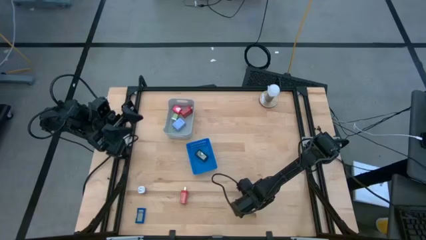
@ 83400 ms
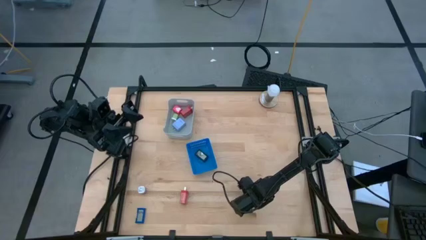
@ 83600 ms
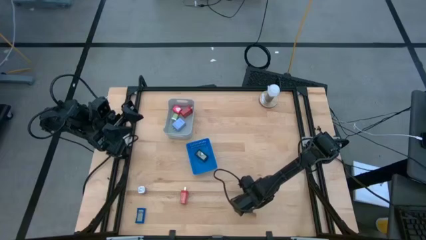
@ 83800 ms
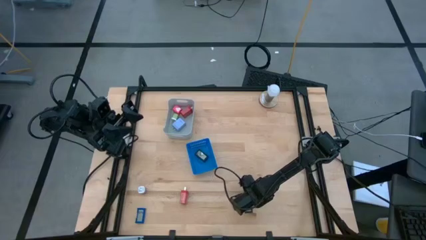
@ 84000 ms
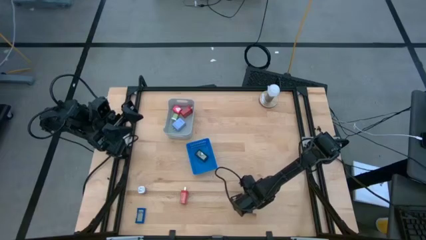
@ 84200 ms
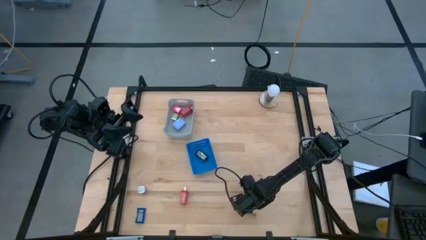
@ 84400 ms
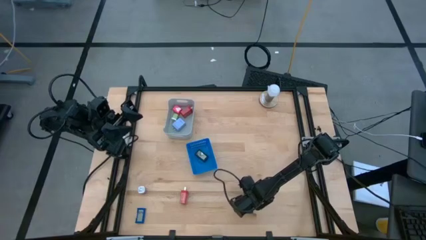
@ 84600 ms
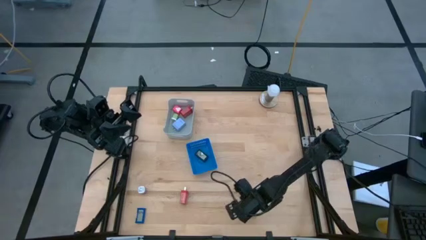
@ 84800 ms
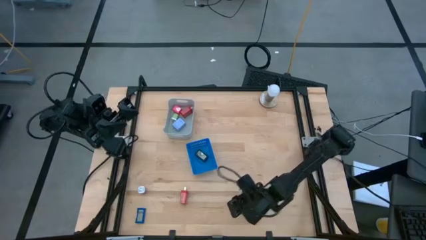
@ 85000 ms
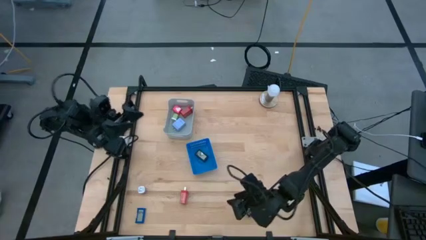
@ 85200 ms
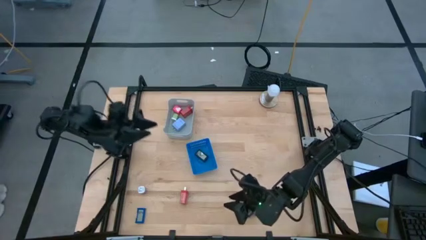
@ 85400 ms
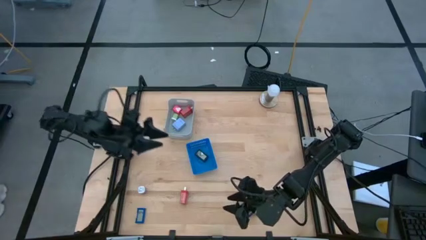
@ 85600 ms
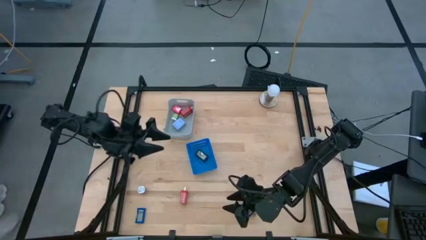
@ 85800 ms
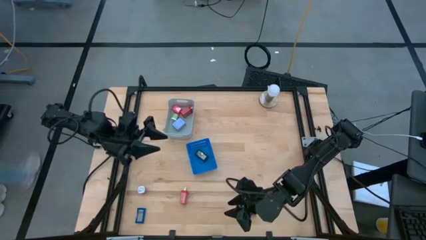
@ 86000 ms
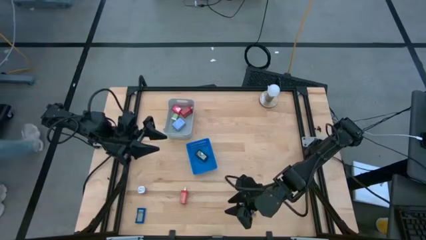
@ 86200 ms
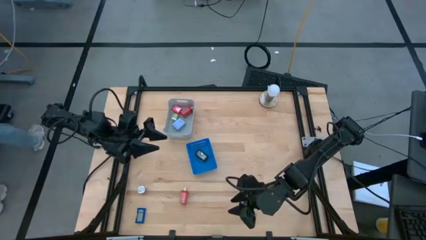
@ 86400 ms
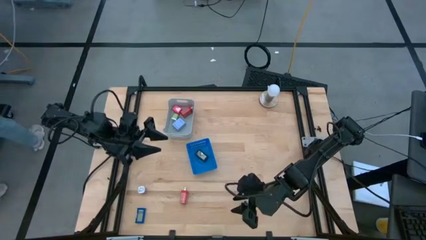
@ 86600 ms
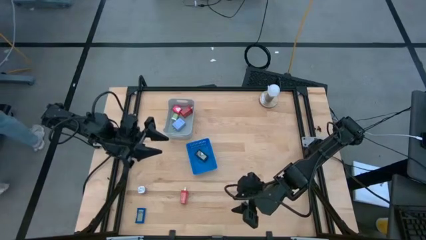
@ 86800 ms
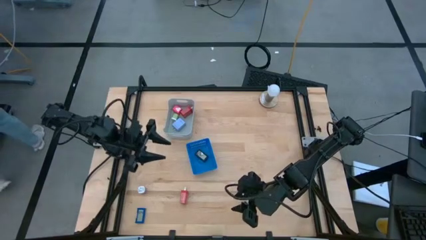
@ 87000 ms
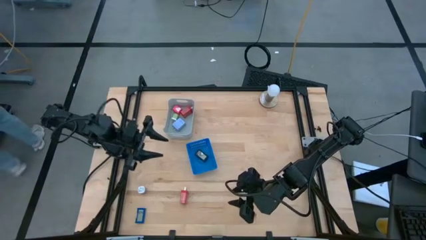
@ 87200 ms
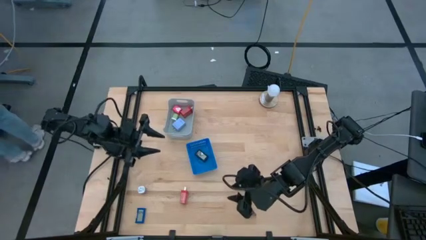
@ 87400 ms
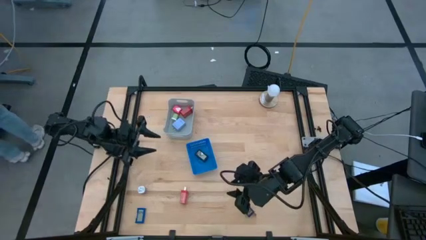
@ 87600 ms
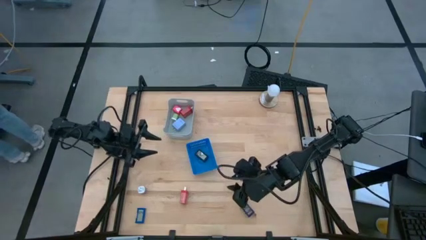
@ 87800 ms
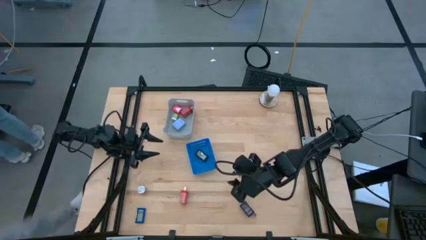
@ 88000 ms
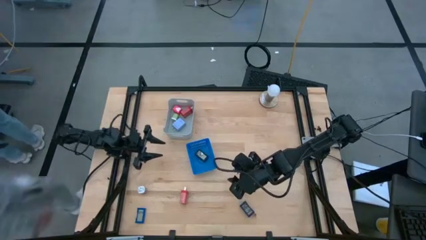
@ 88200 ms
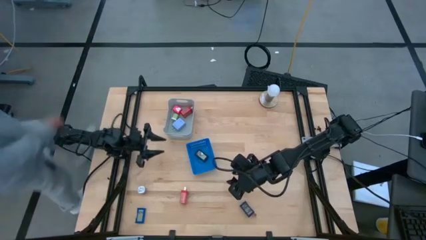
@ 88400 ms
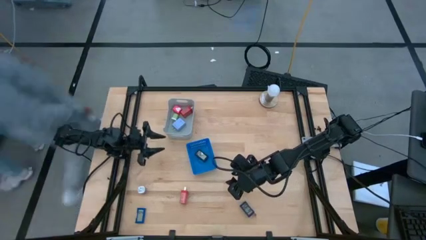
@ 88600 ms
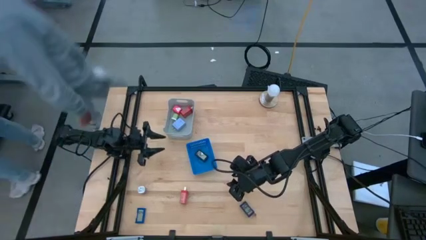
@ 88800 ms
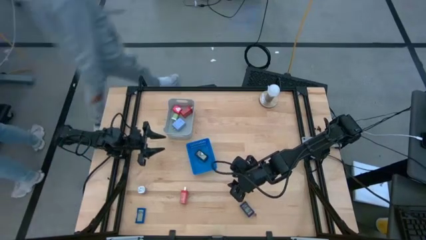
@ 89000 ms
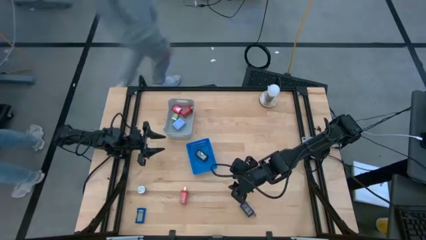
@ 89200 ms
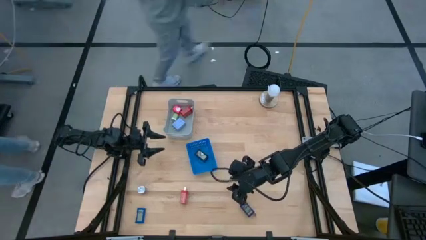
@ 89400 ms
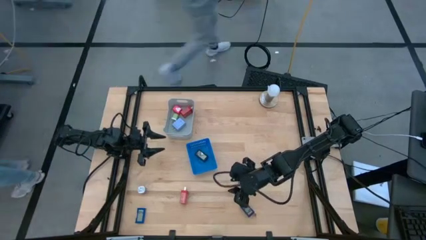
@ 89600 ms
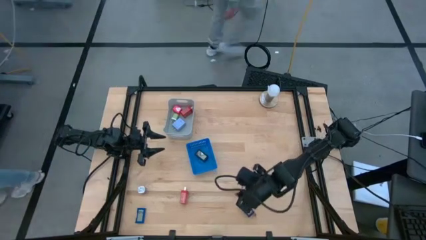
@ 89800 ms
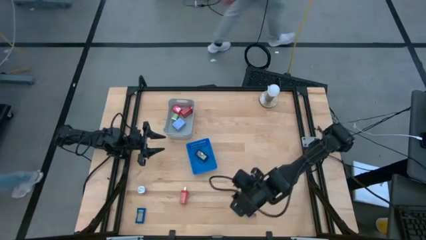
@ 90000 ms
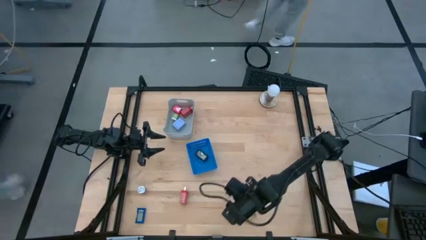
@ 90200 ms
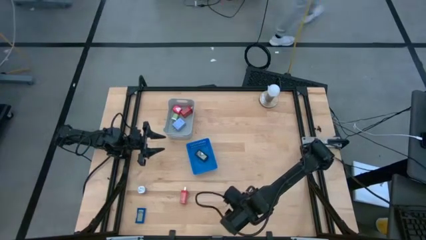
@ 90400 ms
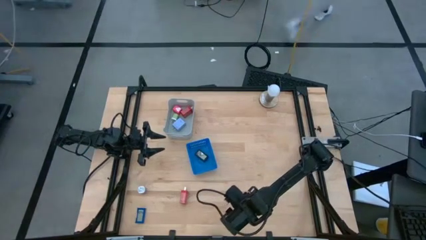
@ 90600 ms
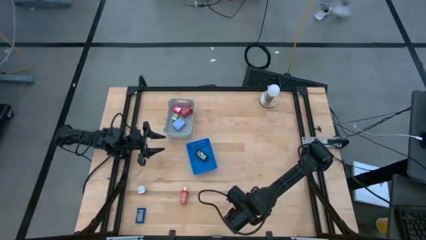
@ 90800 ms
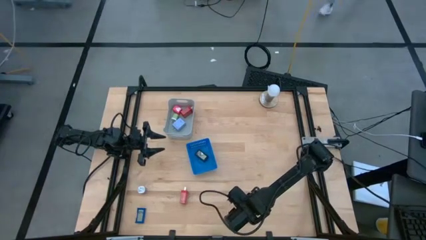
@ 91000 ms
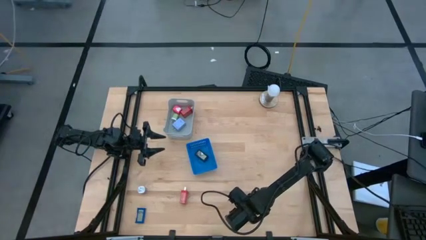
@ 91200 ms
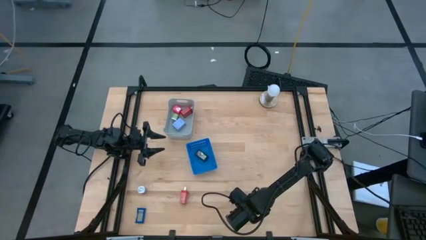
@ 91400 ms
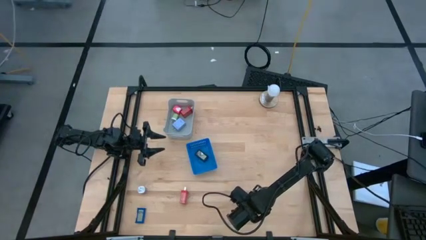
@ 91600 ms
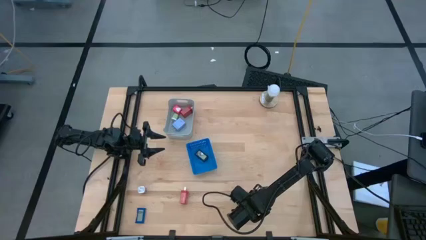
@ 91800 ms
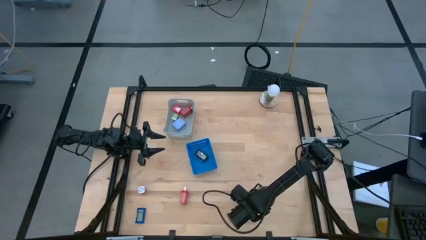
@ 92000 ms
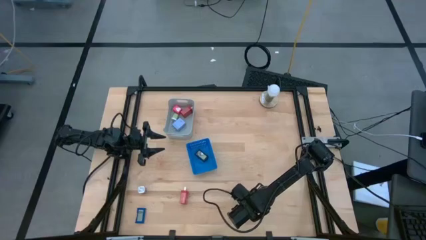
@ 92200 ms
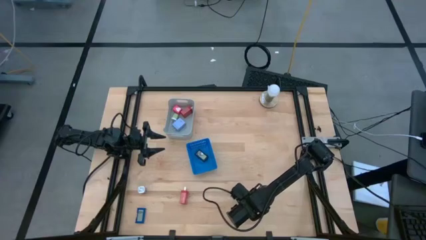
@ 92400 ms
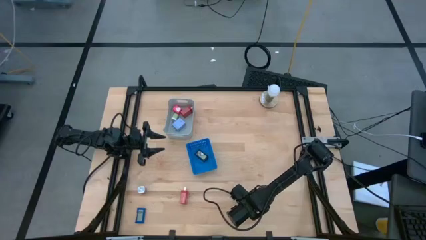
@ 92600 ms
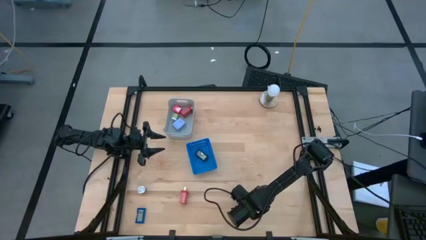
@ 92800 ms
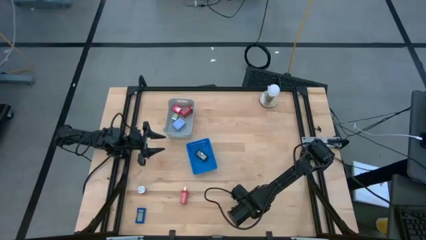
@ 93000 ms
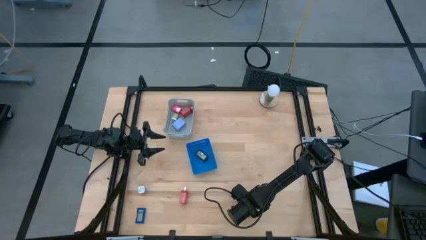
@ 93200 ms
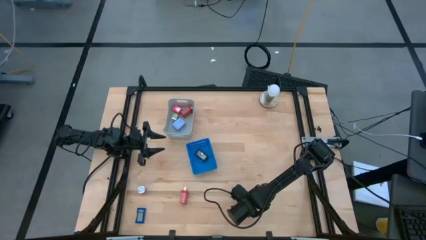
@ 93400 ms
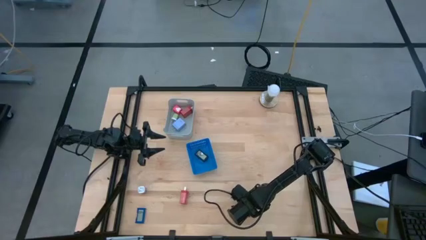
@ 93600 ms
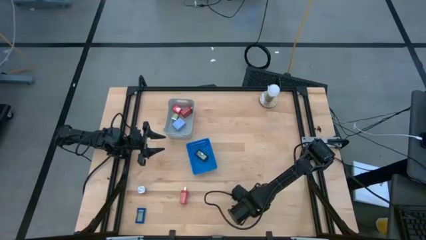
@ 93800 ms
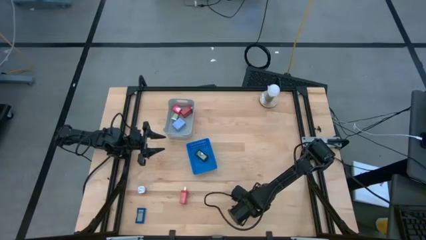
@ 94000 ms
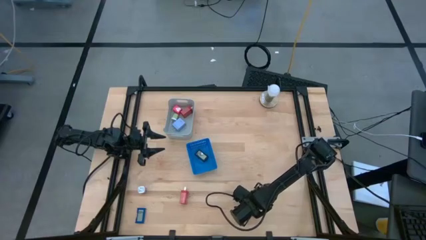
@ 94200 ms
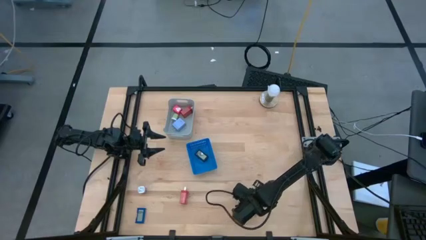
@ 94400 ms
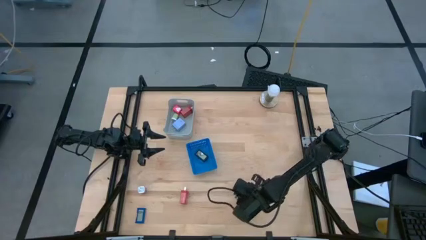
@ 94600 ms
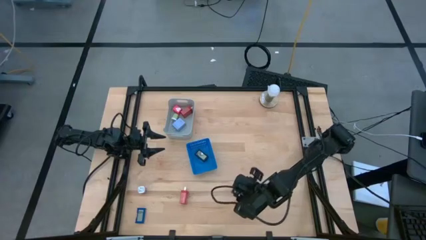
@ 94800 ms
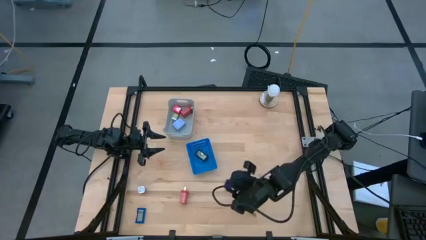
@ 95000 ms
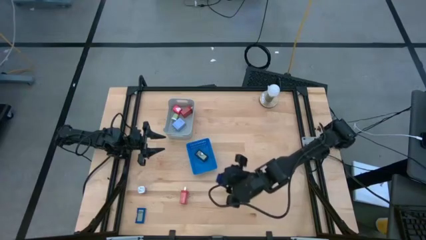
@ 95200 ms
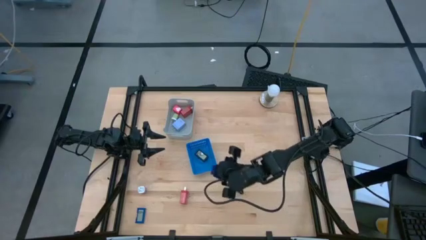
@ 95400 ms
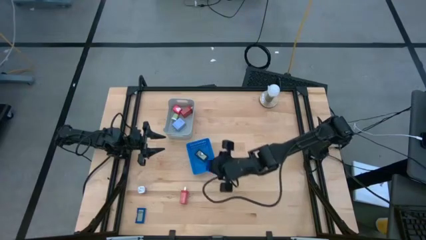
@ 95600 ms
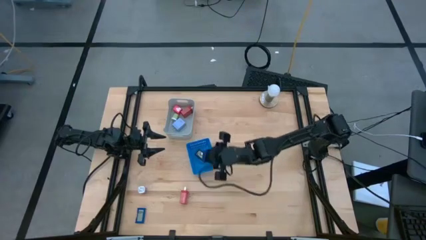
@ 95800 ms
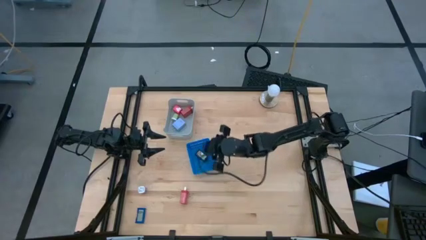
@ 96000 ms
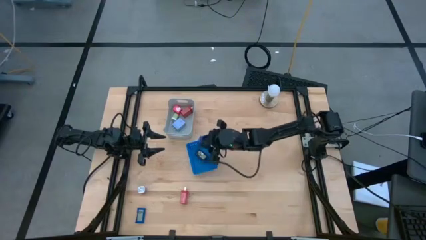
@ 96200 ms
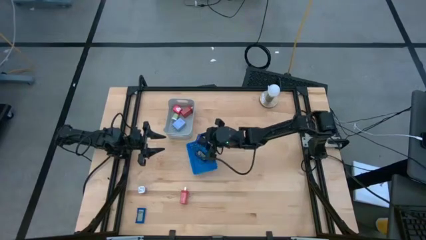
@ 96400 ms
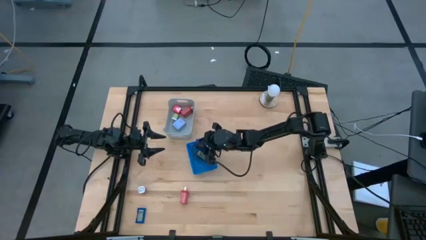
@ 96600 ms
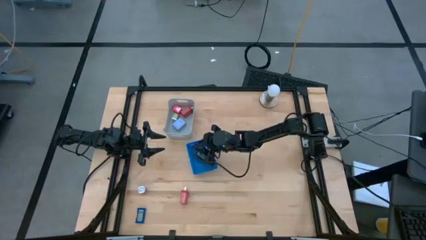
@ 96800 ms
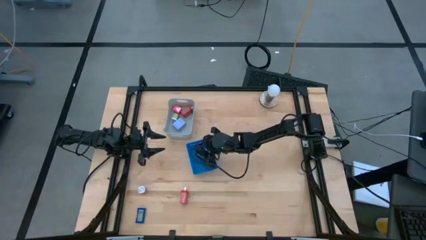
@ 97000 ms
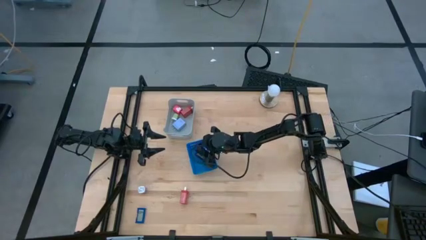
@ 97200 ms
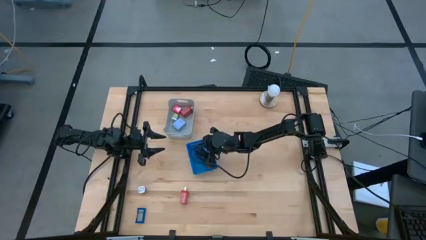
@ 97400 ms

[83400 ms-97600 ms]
Task: Pick & Place Office items
Put the right blue digital timer into the blue basket

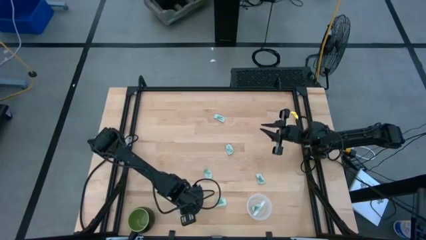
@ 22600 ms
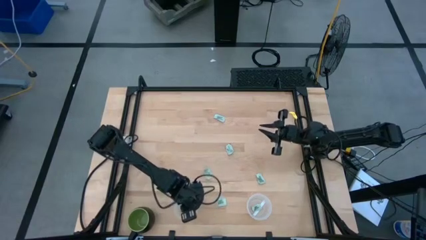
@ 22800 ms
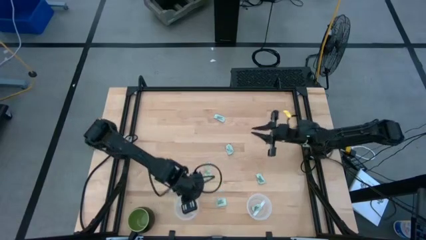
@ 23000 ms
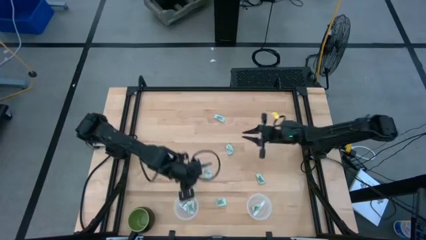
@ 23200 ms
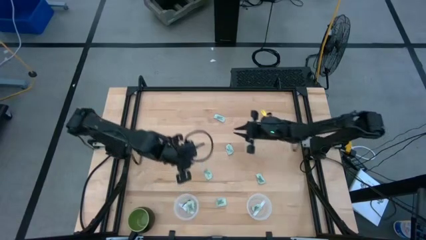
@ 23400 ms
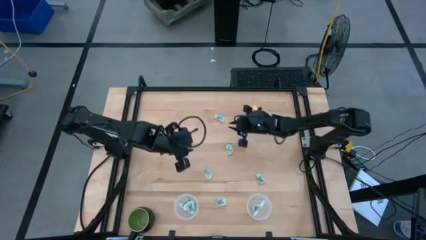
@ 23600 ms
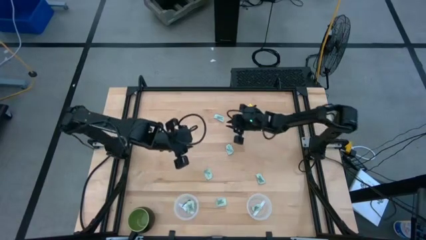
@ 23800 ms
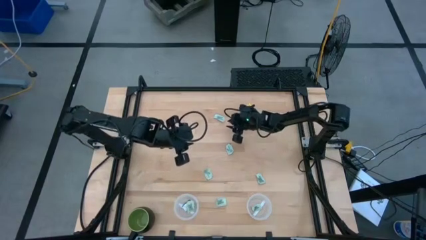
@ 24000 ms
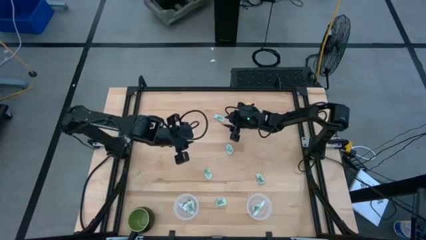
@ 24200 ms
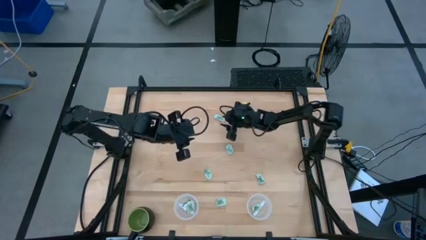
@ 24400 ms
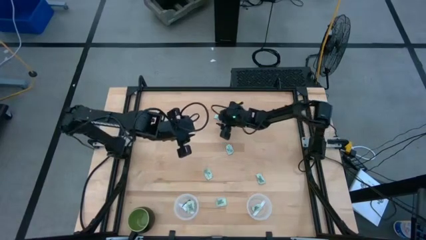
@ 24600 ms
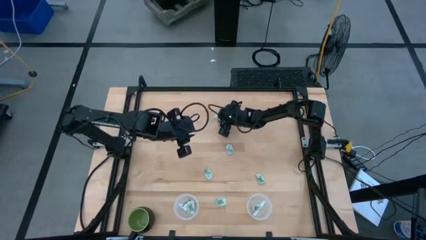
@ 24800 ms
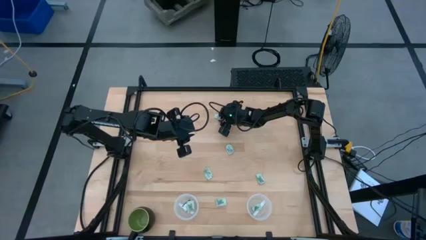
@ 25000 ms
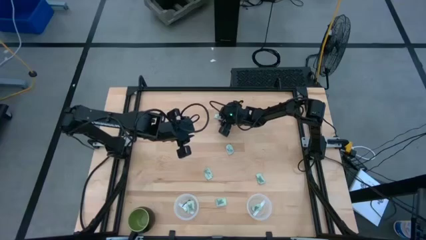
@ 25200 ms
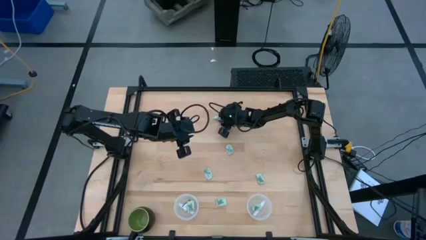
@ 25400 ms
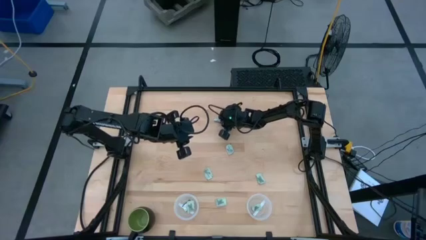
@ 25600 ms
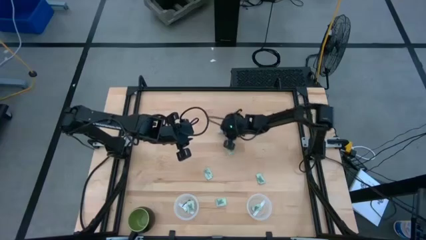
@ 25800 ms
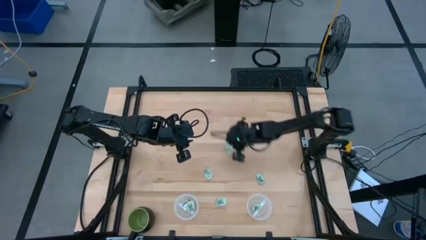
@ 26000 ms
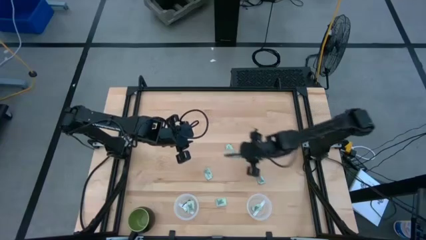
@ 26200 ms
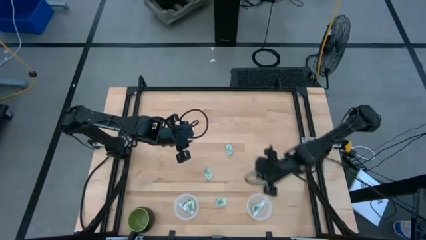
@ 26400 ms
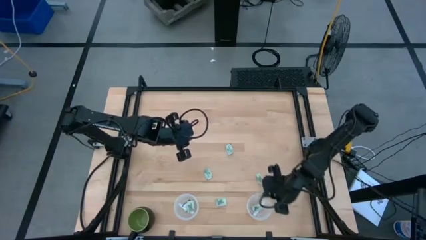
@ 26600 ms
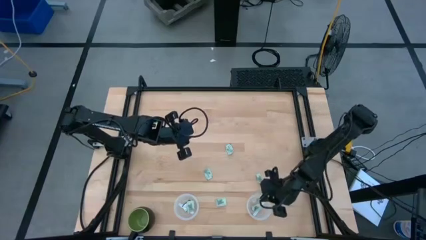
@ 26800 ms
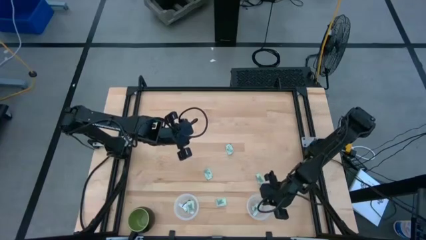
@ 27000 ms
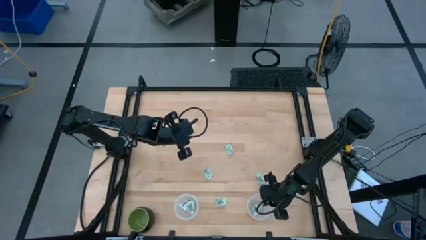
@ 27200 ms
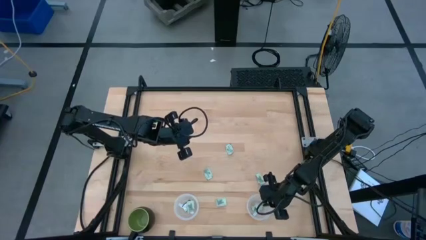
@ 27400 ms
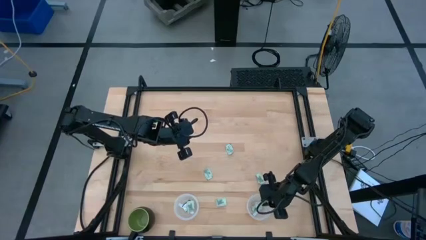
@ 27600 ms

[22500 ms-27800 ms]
Task: Pick and place Stevia / Truvia into bins
Put the stevia packet into the right transparent container
